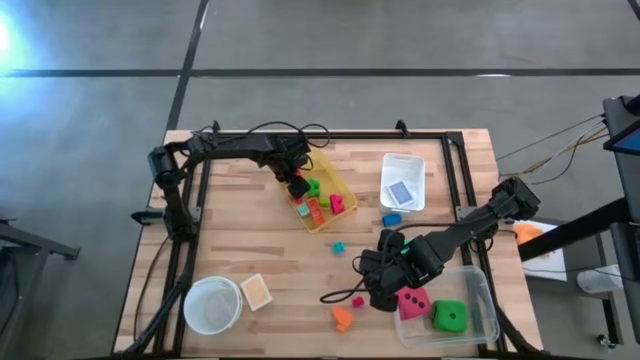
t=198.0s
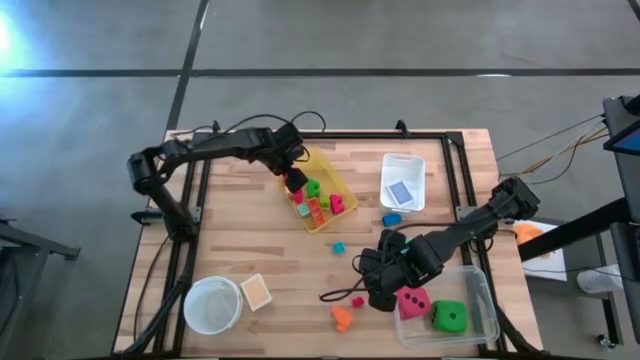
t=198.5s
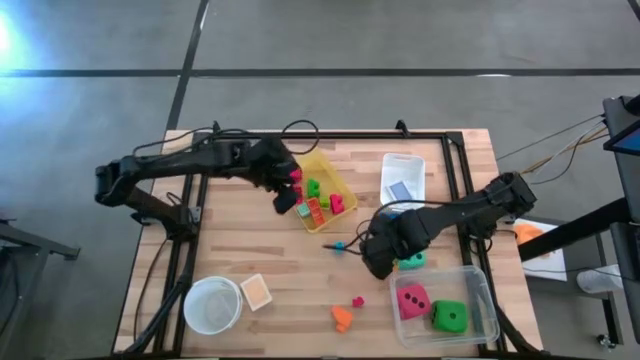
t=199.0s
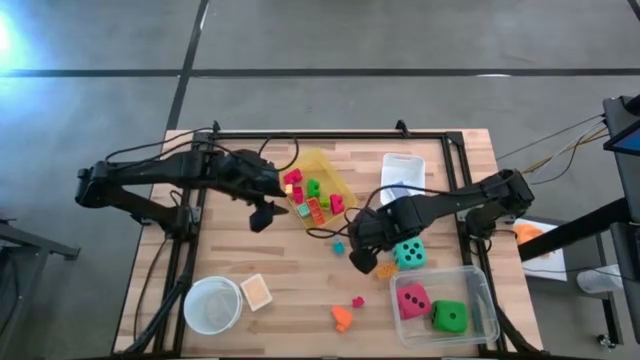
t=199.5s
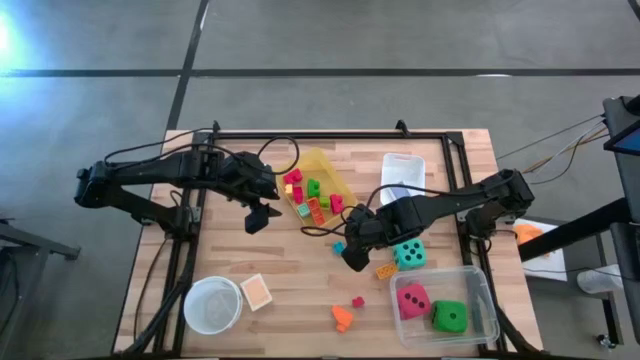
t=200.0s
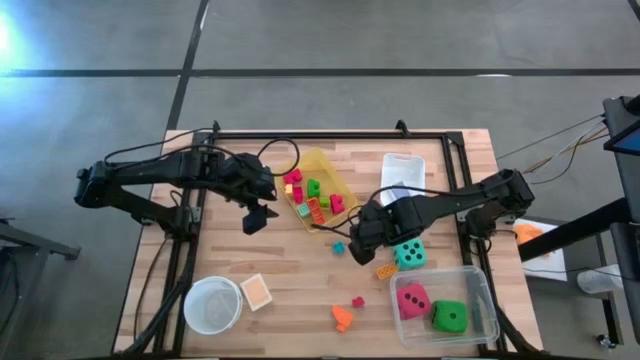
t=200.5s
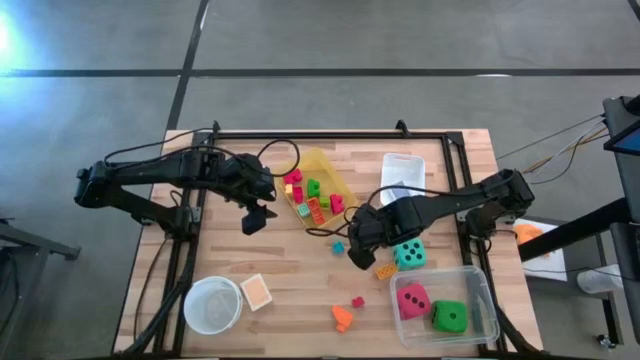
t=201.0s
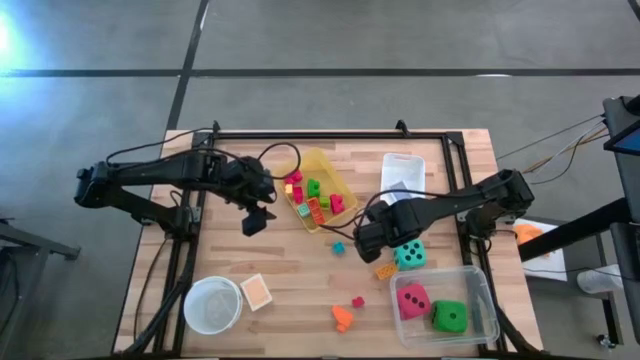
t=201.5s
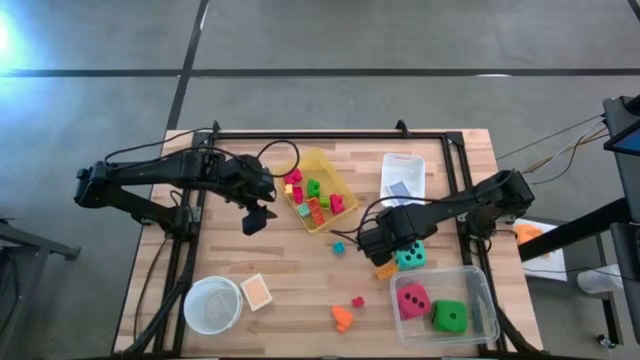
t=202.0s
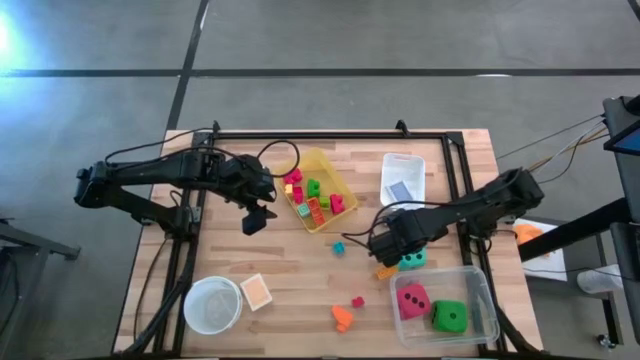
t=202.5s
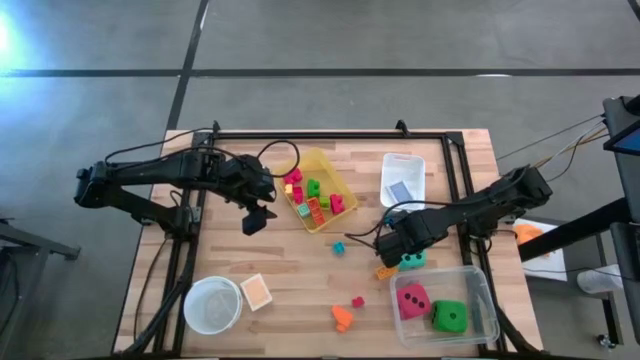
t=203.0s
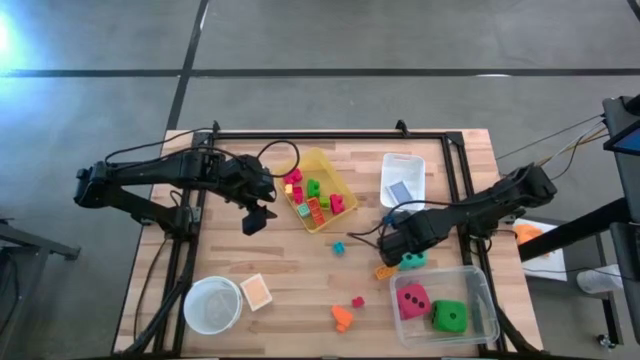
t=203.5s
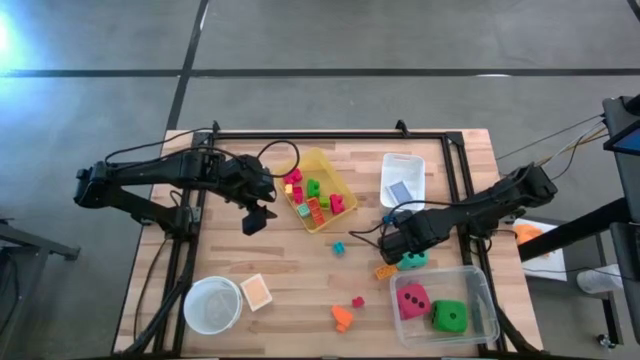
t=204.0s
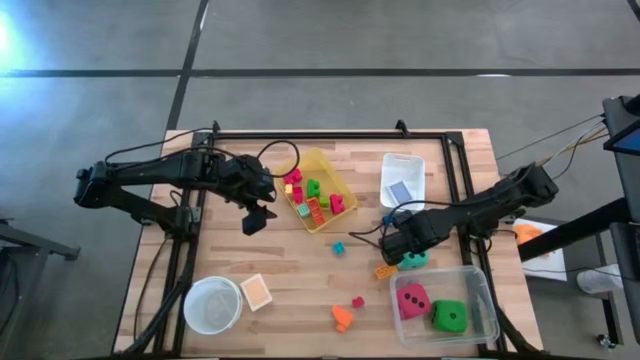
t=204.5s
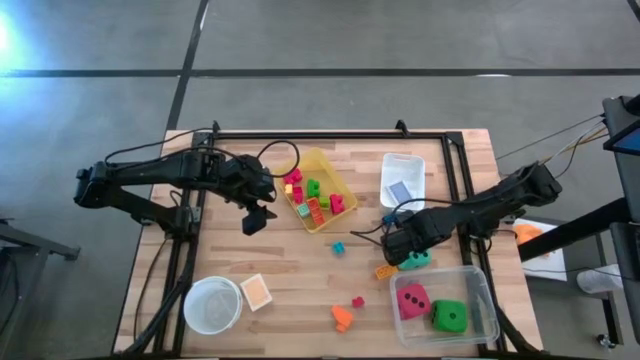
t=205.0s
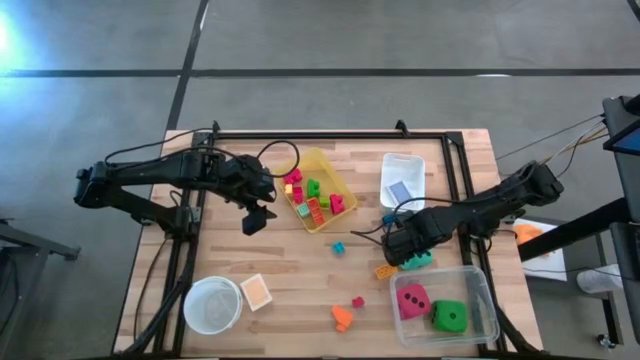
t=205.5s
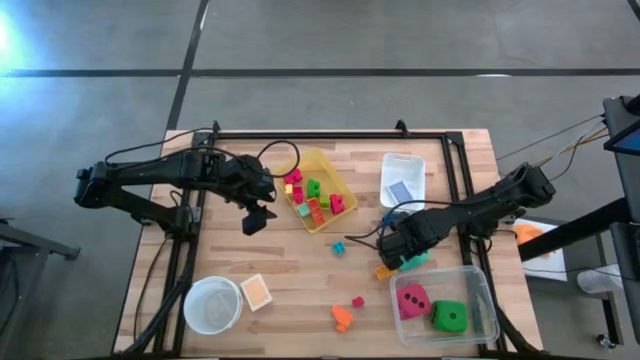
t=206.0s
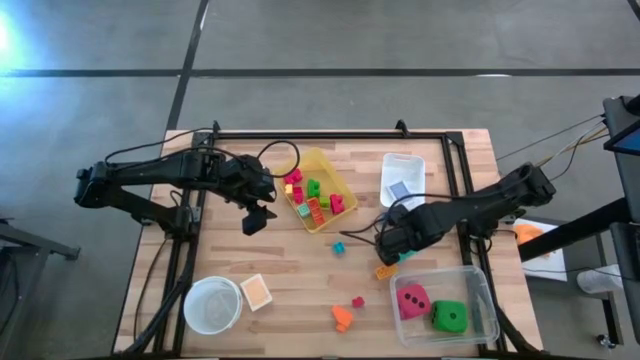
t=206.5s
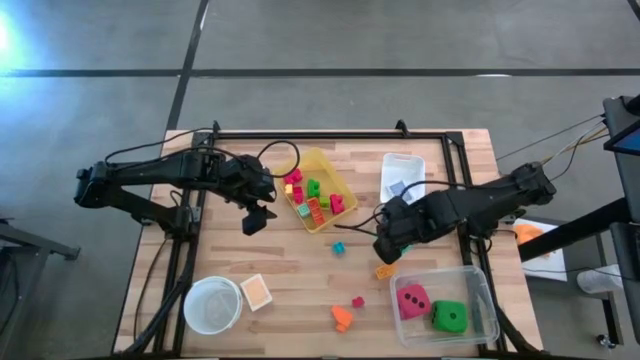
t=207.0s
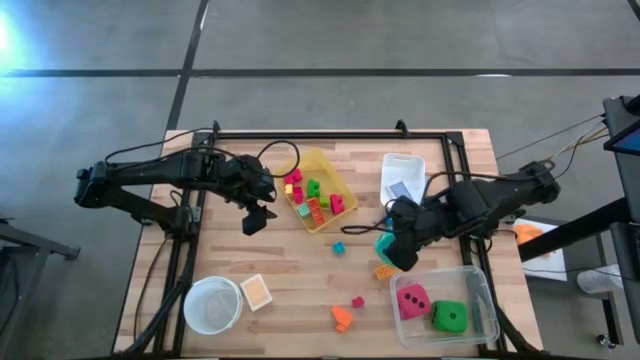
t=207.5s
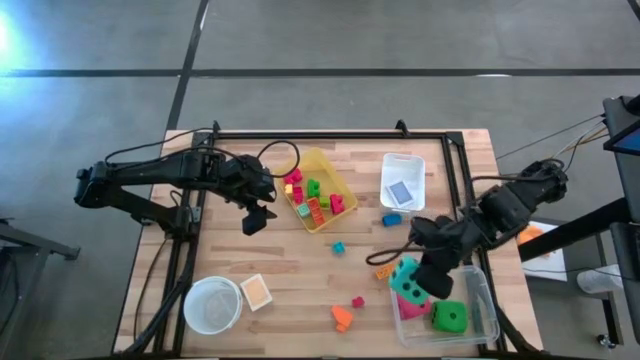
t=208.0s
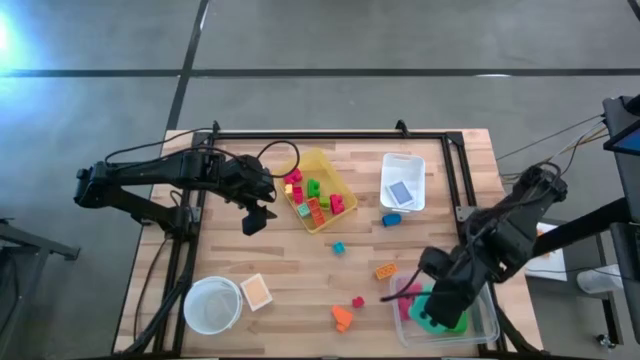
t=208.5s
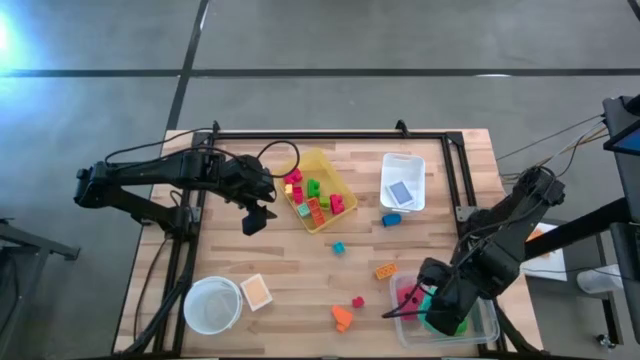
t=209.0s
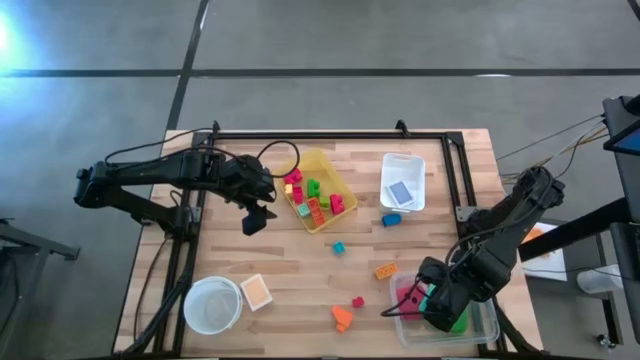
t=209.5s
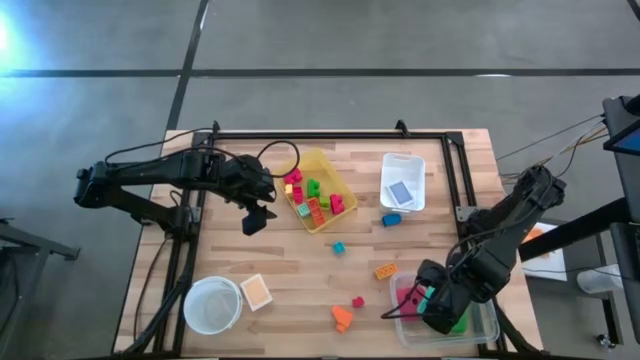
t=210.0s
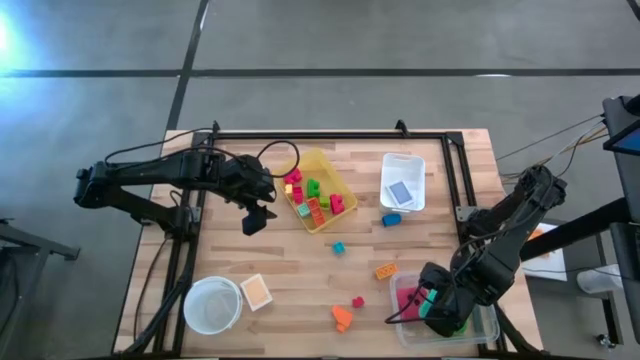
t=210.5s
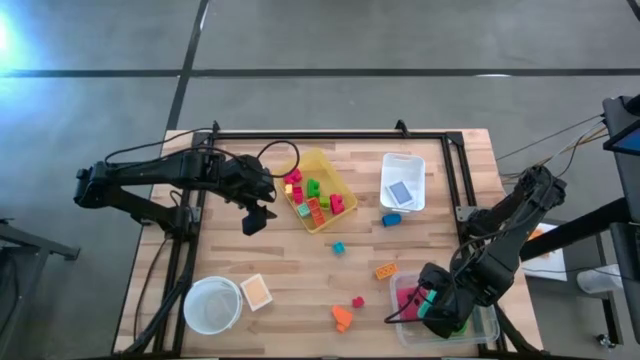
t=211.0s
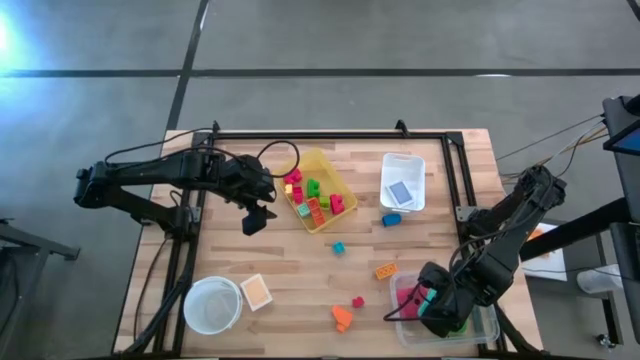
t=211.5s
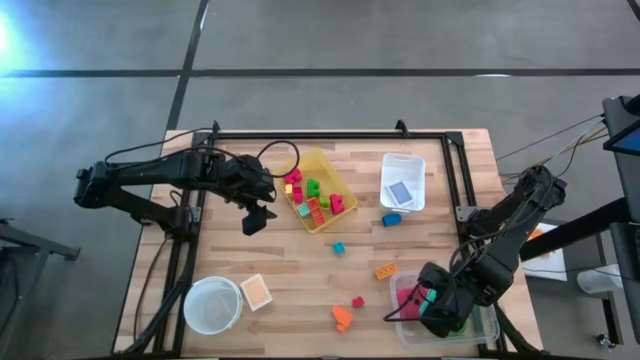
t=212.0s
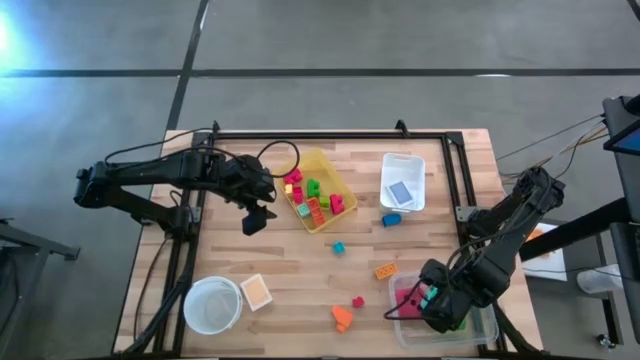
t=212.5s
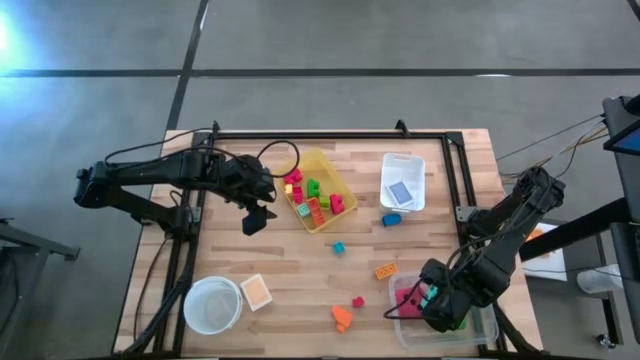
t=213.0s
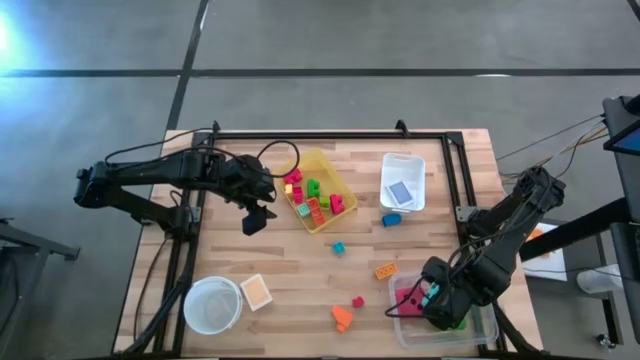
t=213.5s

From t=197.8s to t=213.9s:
Task: Pick & Place Toys
Put the blue dice into the transparent bin

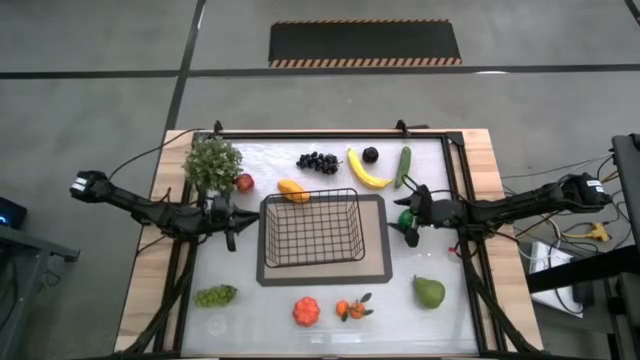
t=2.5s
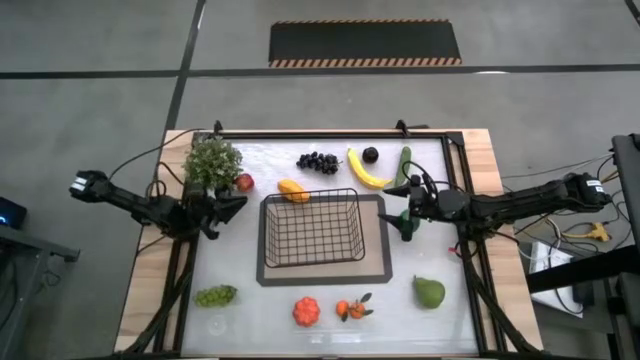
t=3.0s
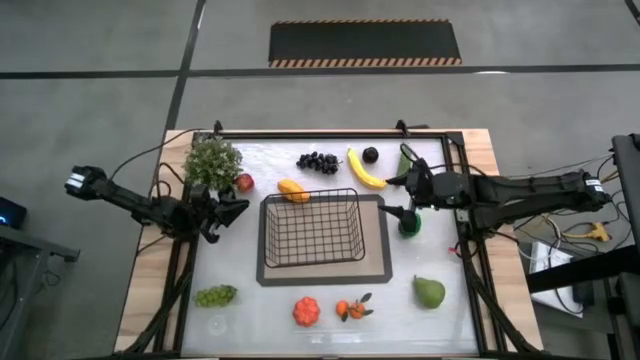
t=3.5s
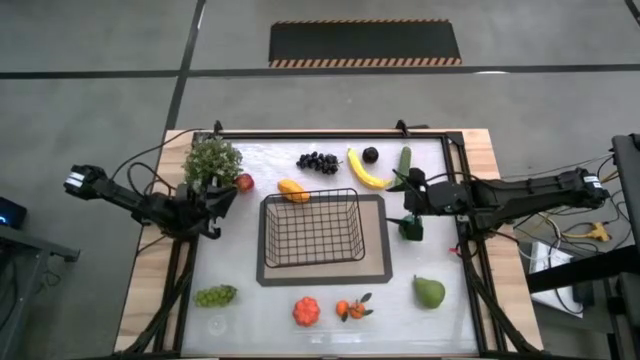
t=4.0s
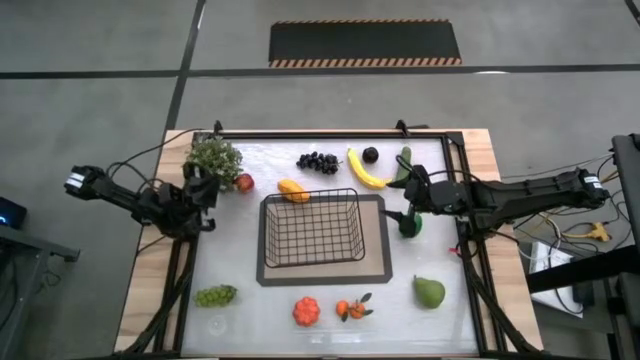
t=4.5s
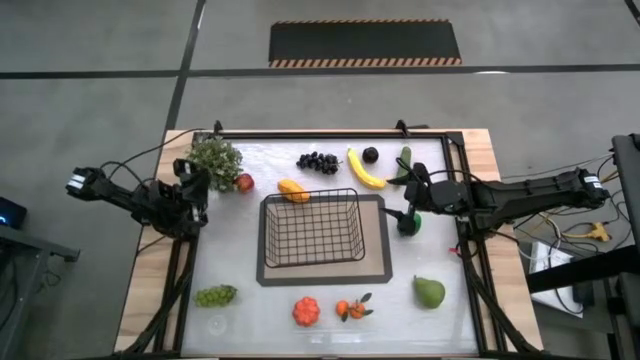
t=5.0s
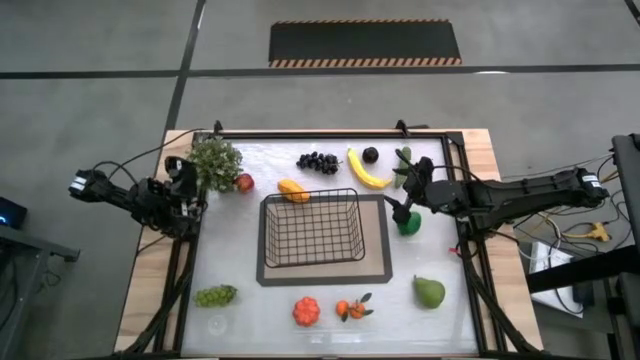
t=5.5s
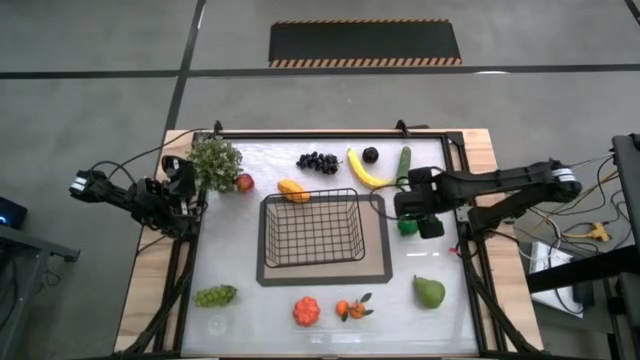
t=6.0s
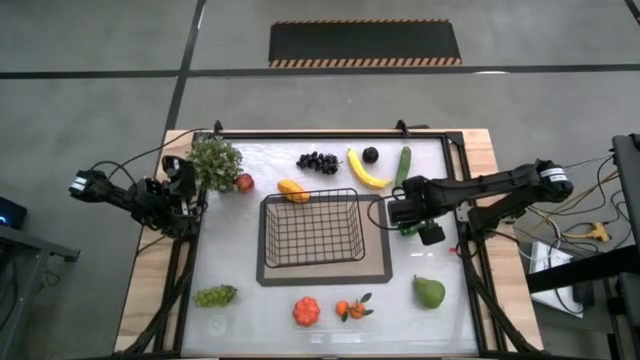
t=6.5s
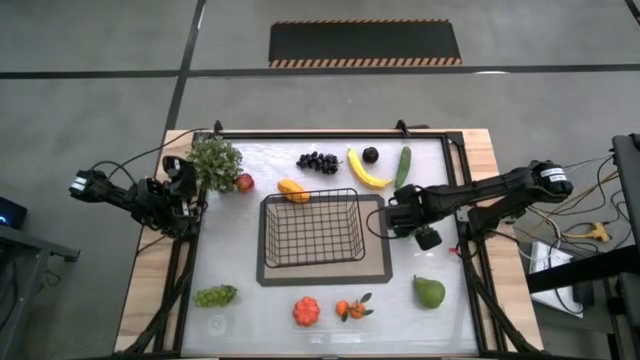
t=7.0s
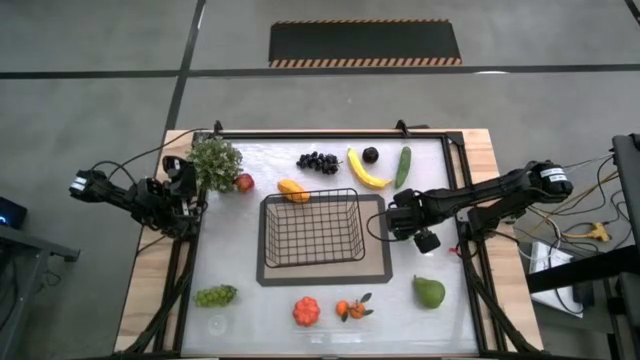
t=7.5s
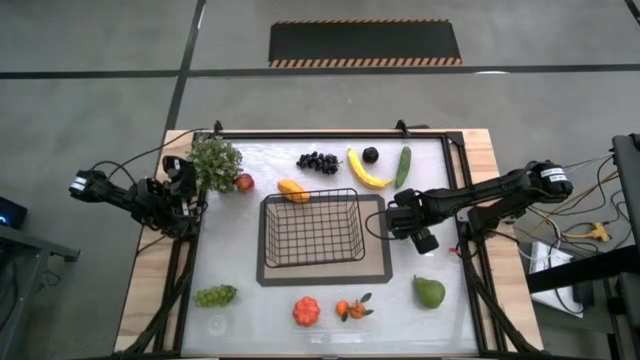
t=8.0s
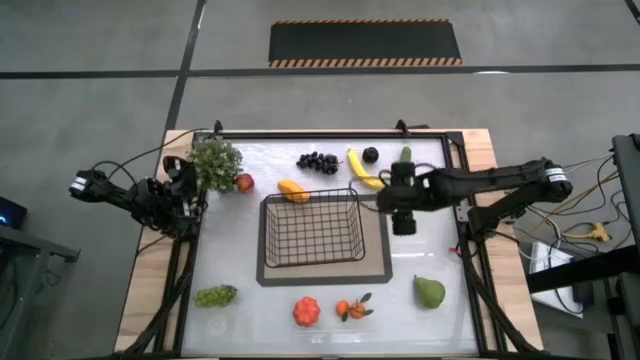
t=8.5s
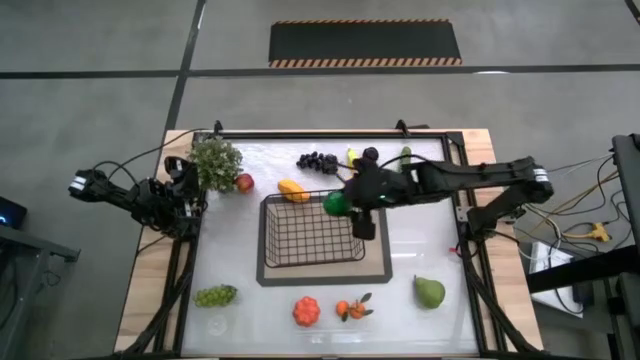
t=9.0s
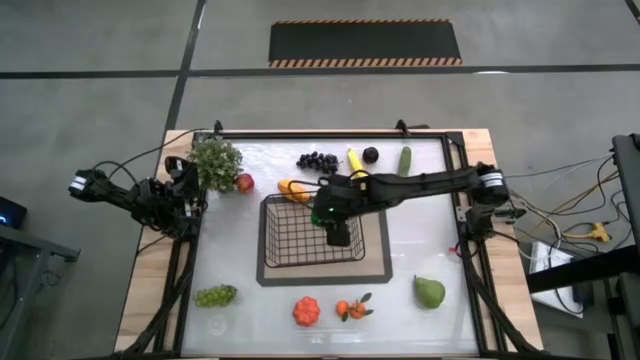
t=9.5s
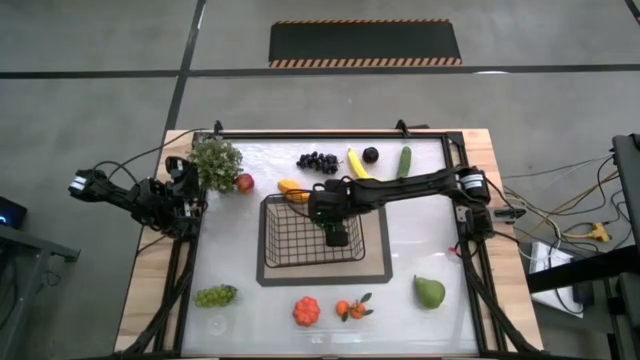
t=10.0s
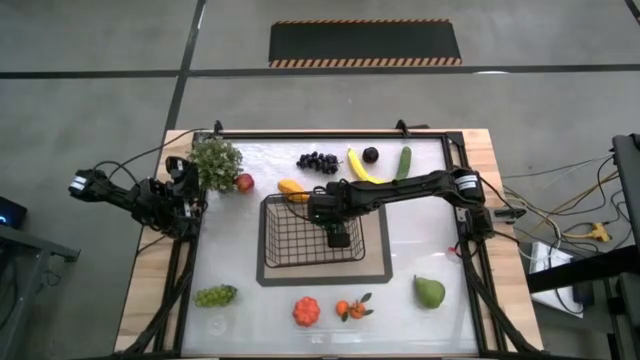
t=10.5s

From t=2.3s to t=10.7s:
Task: Build produce basket
Put the green lime into the black wire basket
